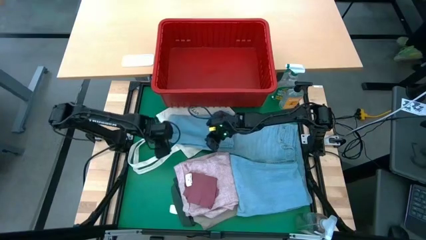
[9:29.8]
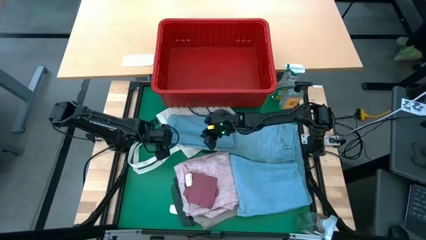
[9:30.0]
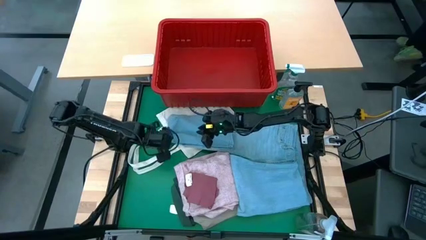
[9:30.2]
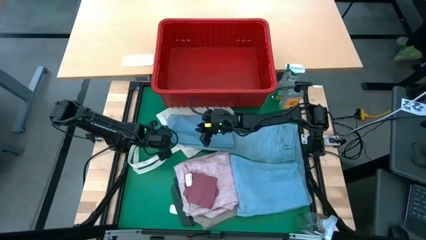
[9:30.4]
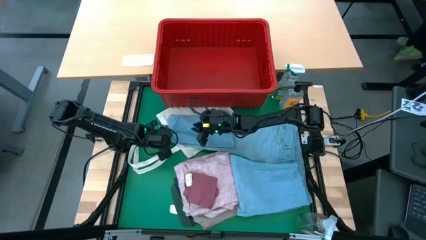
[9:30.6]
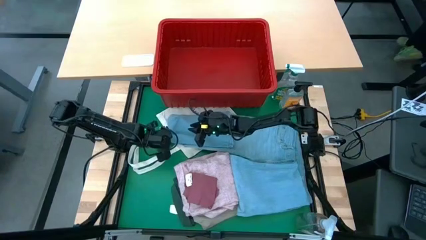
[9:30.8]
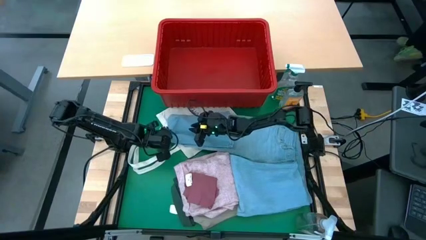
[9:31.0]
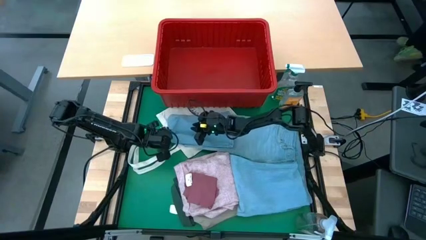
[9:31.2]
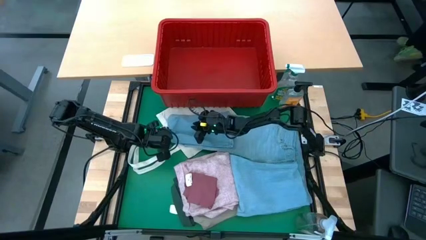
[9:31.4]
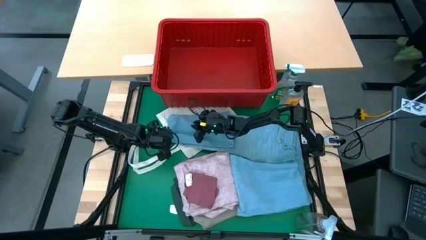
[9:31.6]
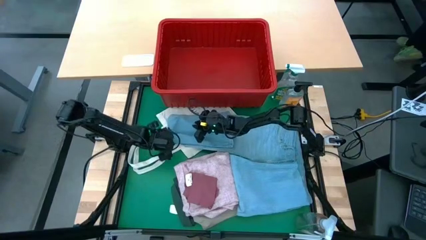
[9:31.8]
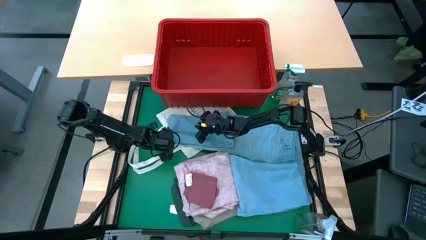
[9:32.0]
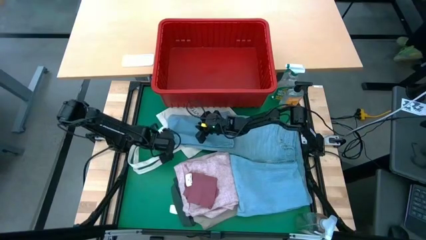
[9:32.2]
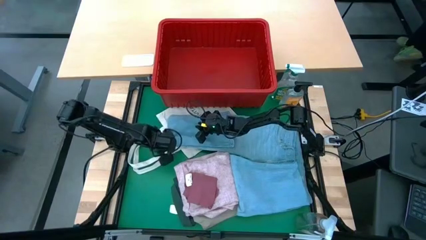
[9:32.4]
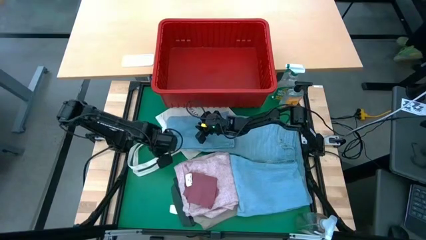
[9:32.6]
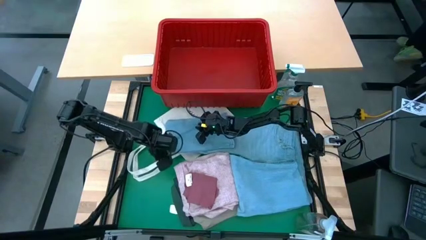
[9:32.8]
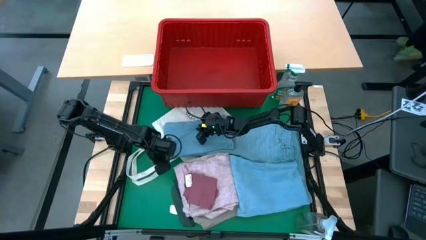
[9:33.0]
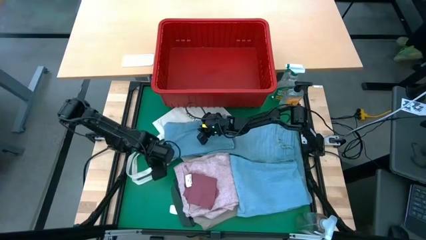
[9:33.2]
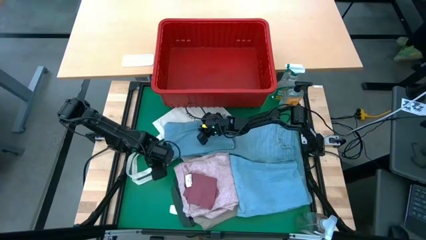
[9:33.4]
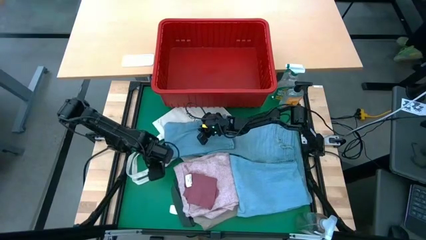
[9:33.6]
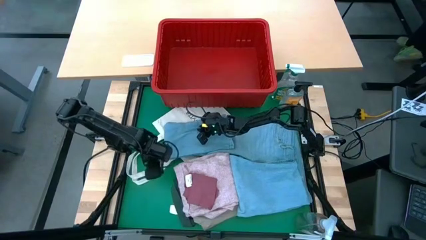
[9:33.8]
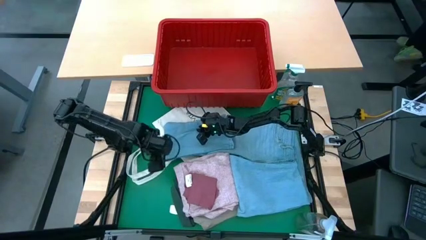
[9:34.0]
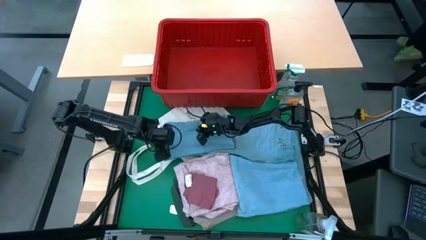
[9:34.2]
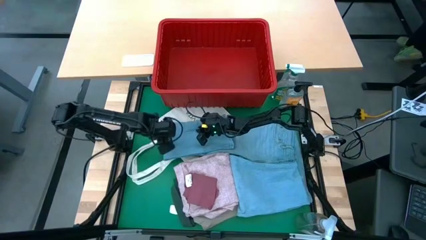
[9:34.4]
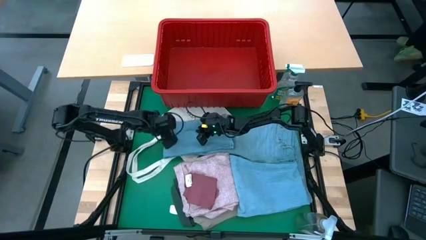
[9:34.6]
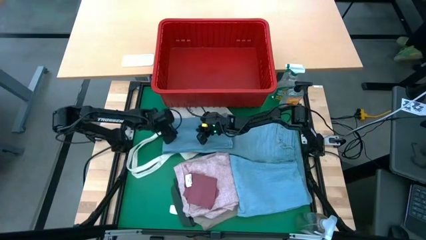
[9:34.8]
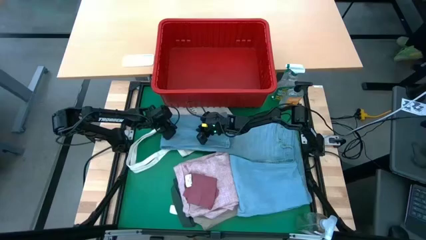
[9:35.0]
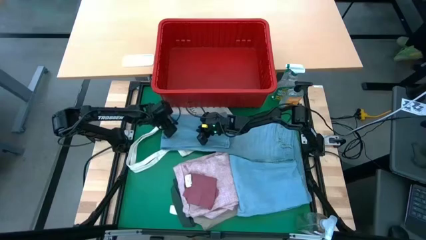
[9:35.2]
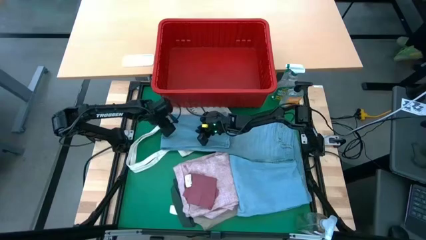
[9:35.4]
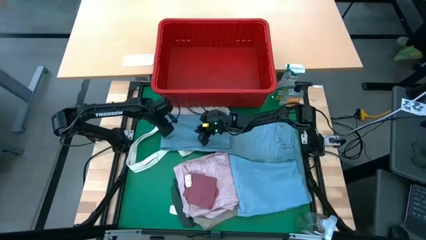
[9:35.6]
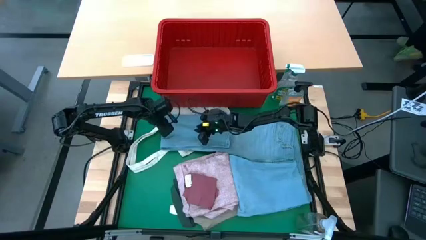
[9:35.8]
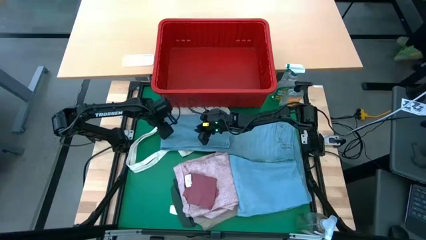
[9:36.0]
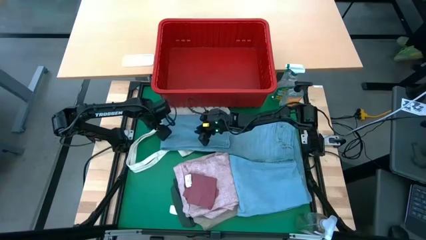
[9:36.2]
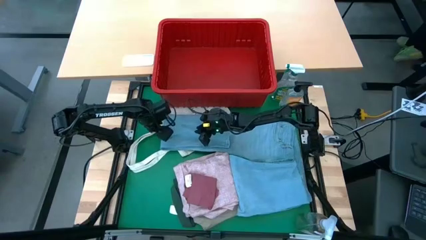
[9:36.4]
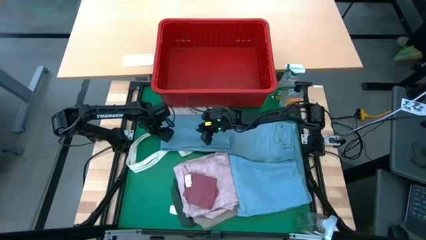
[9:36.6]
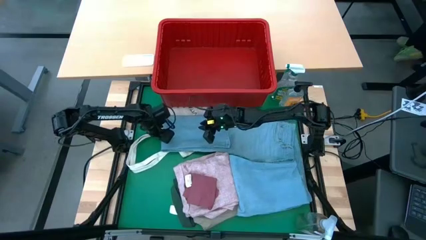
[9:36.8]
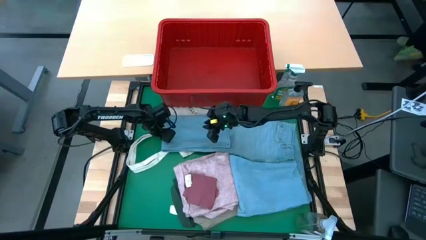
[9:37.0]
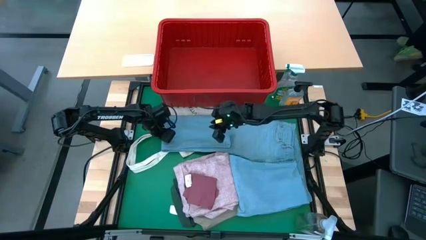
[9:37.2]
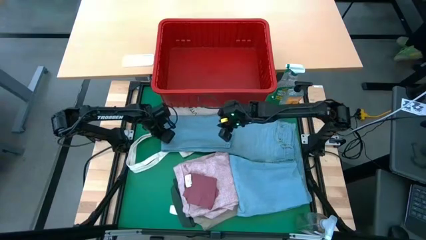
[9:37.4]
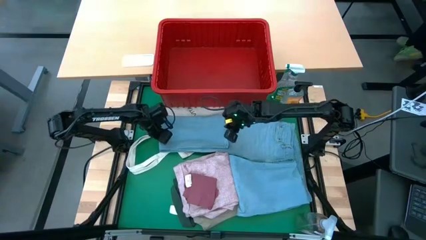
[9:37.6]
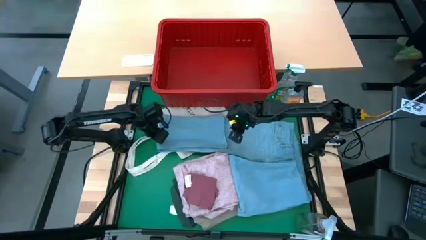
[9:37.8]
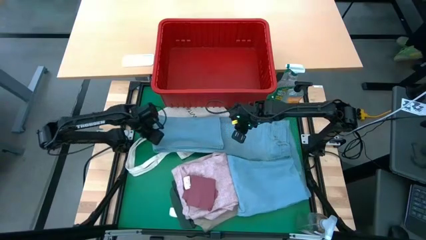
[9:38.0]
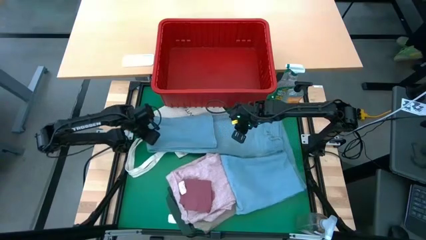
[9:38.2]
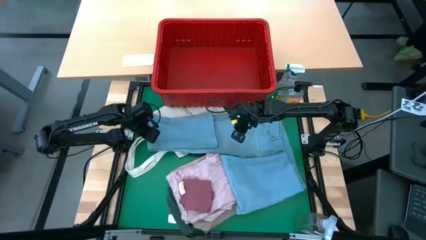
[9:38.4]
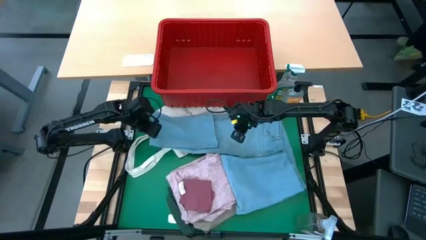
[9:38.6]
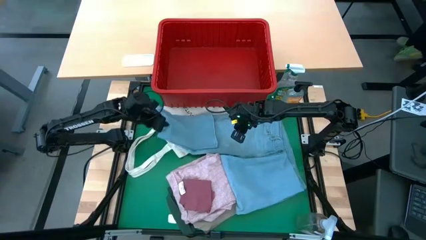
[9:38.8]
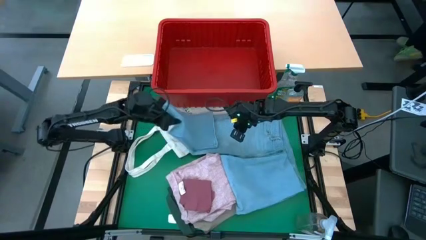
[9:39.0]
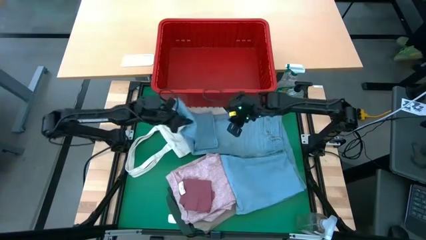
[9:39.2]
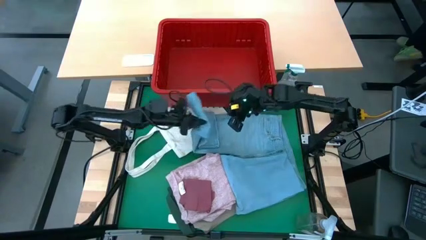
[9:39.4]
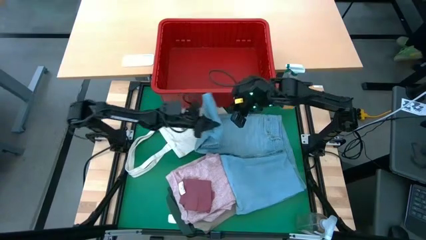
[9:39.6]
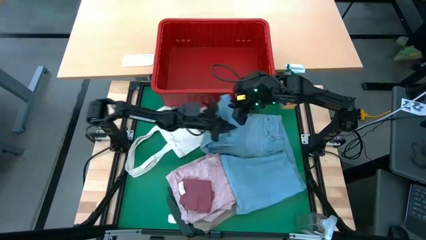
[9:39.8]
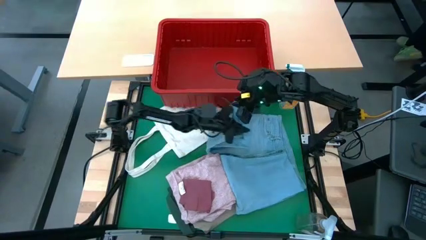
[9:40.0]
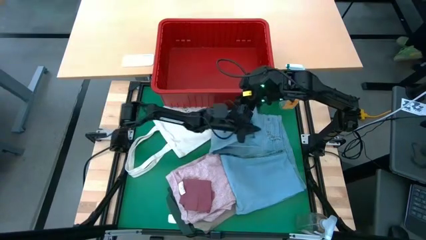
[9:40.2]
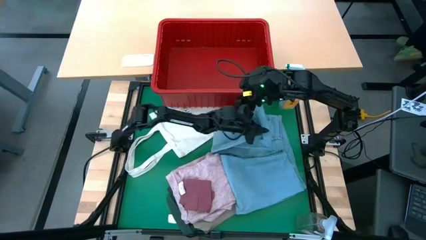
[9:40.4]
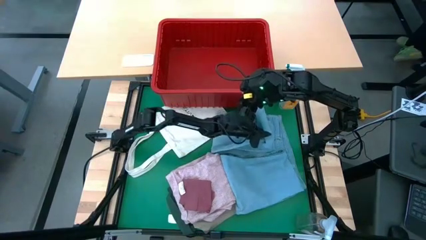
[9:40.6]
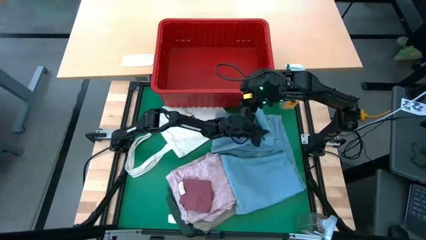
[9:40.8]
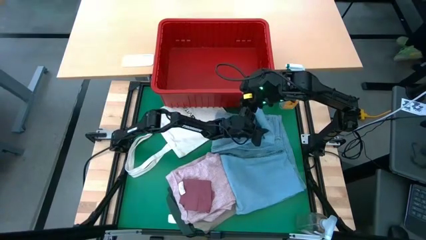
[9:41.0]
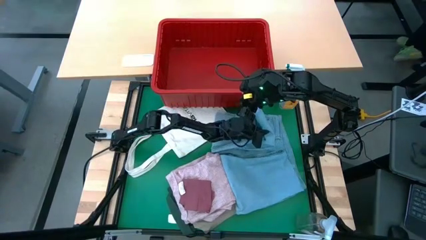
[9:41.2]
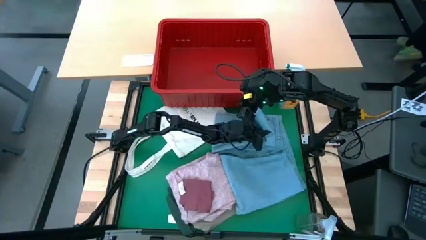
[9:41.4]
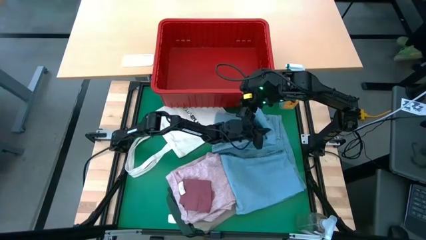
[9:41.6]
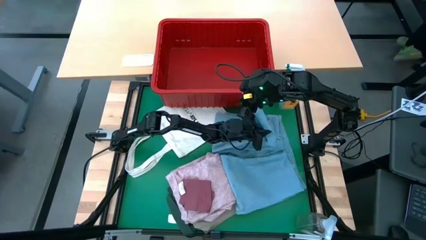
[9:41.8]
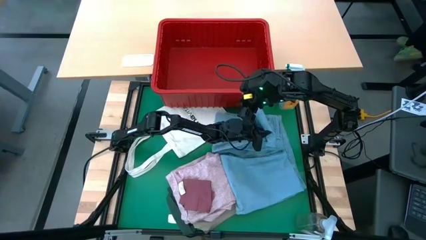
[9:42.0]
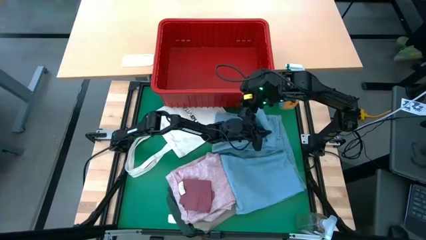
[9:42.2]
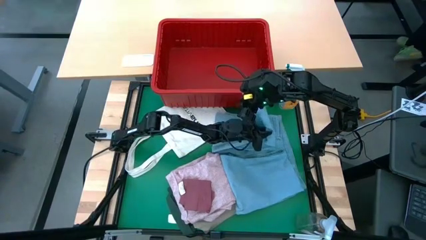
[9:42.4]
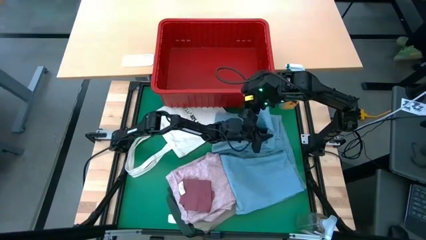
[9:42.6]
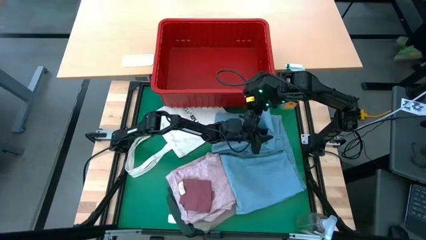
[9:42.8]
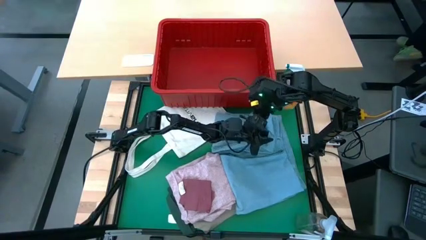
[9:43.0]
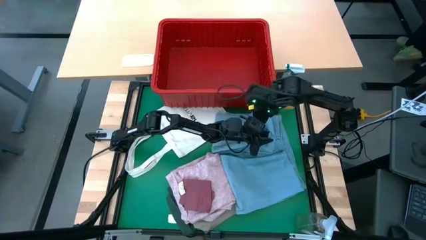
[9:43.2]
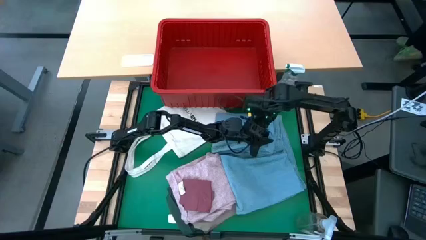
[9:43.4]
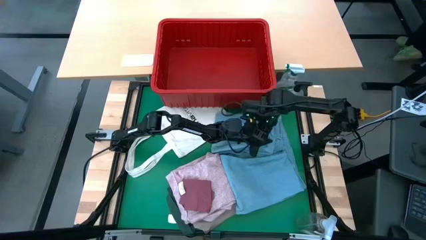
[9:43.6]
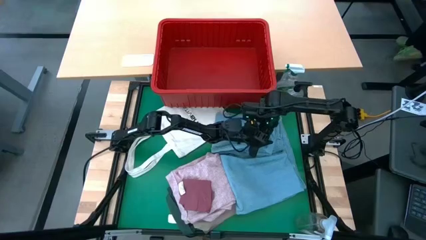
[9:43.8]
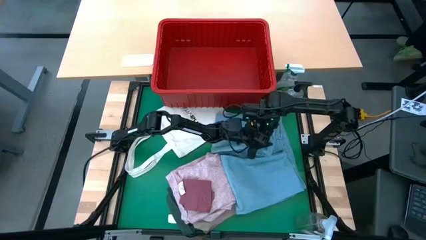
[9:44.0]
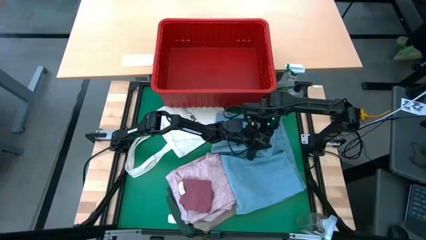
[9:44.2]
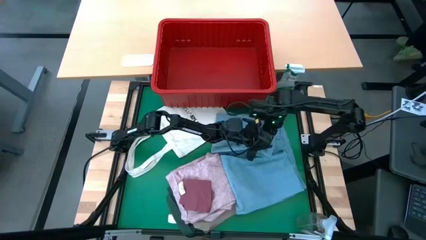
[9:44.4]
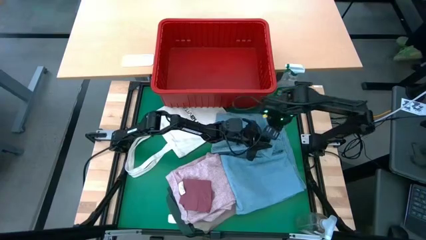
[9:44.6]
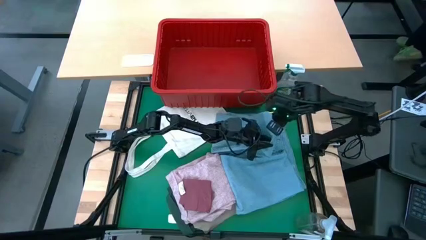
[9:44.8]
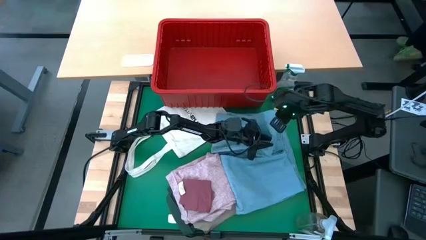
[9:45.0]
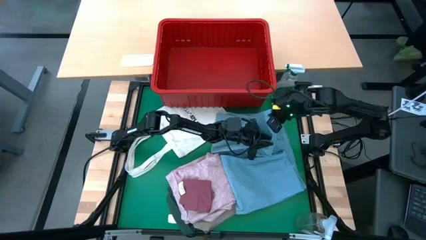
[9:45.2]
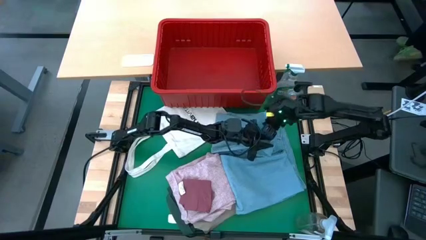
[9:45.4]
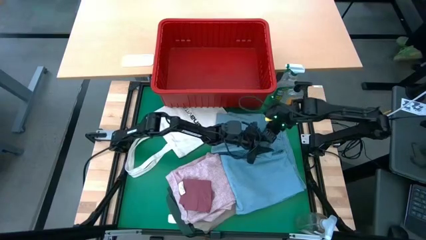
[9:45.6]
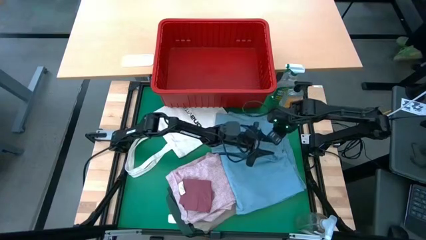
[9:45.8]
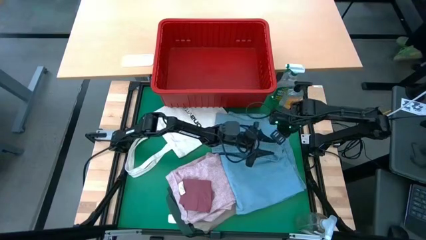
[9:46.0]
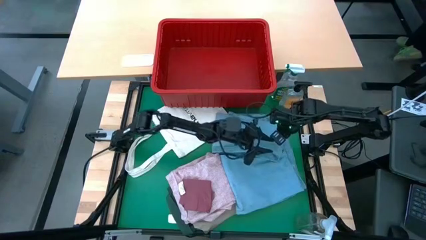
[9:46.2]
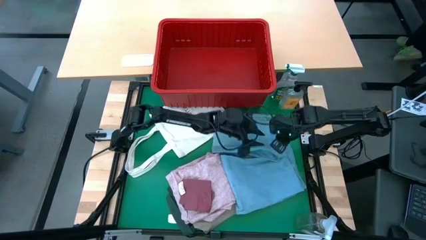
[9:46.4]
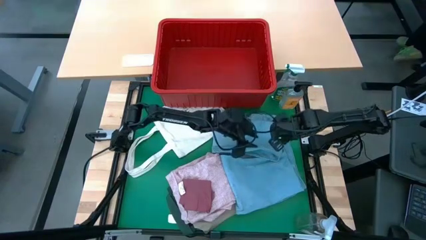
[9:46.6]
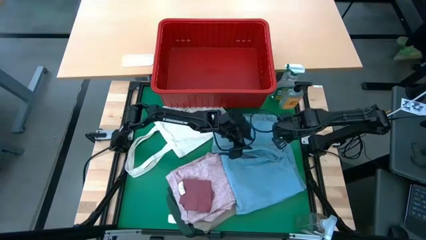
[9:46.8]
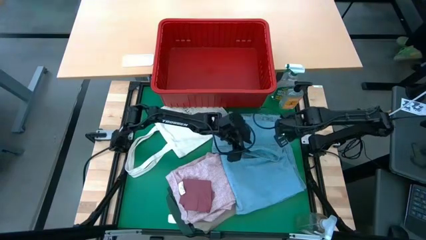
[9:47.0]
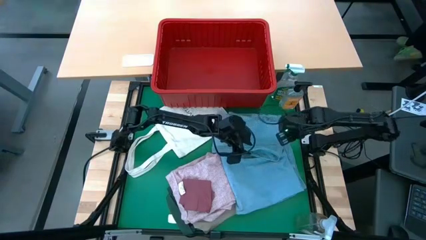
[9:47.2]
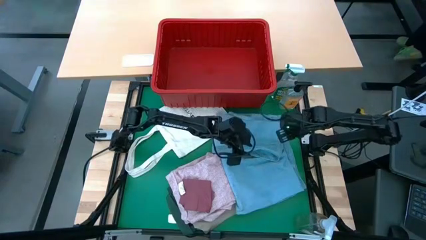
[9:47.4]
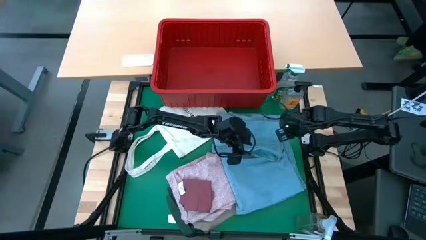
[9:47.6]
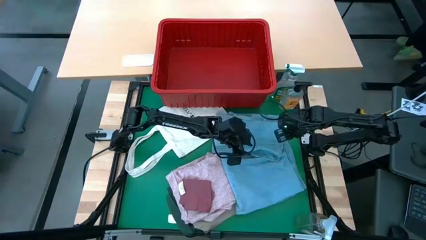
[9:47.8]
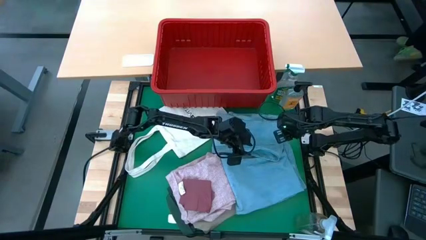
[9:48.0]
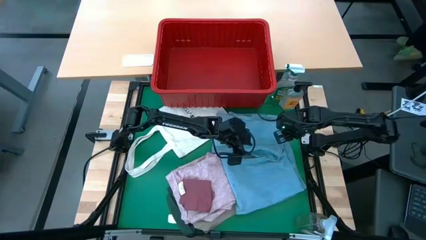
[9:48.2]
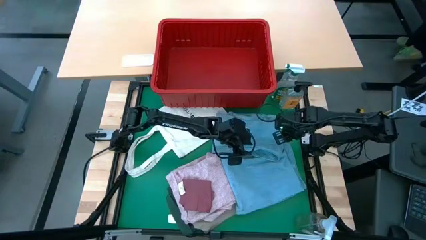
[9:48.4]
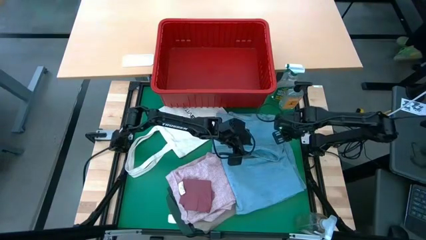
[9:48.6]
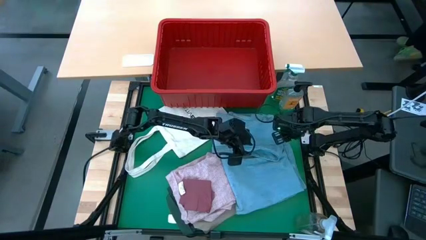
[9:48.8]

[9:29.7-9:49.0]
Task: Fold laundry
Fold the blue jeans
